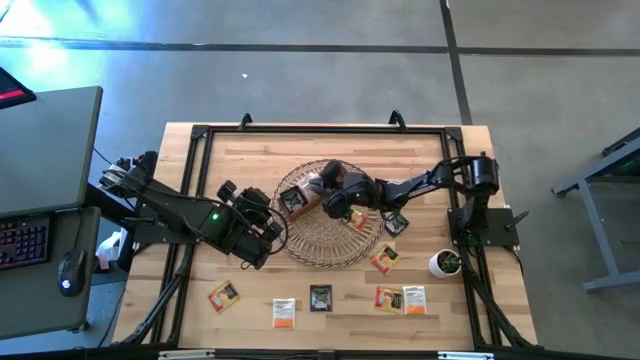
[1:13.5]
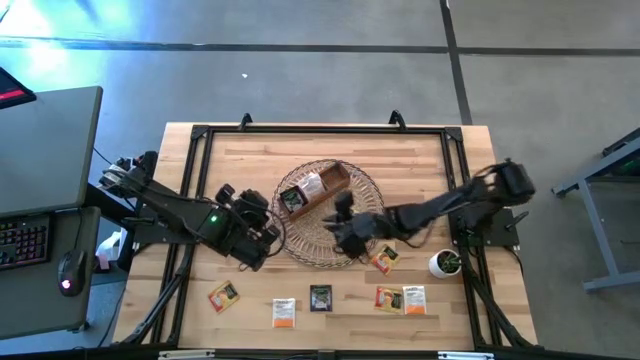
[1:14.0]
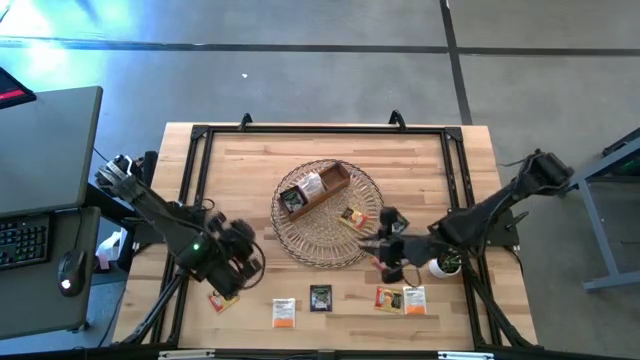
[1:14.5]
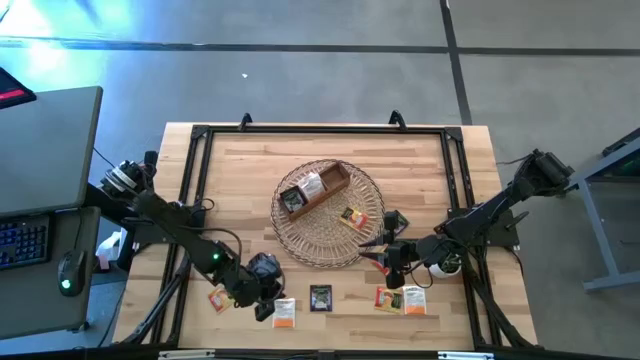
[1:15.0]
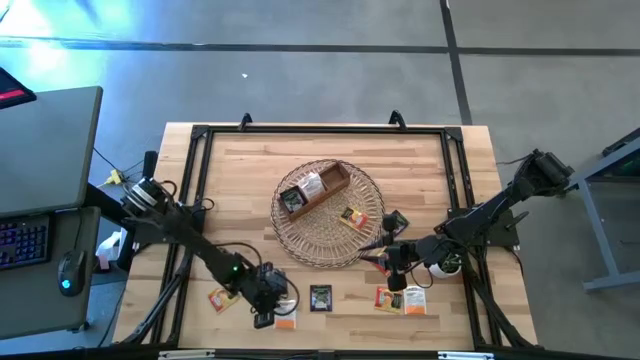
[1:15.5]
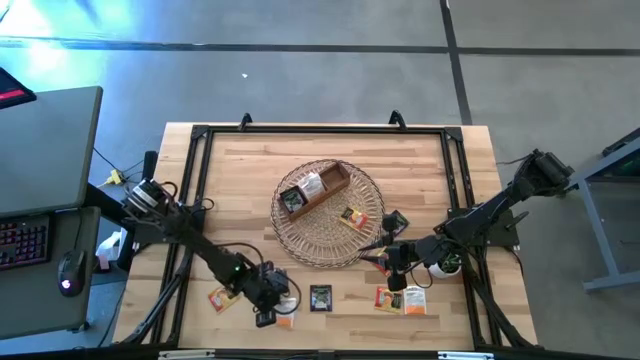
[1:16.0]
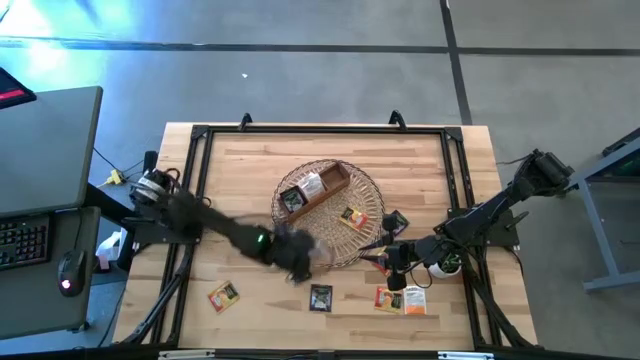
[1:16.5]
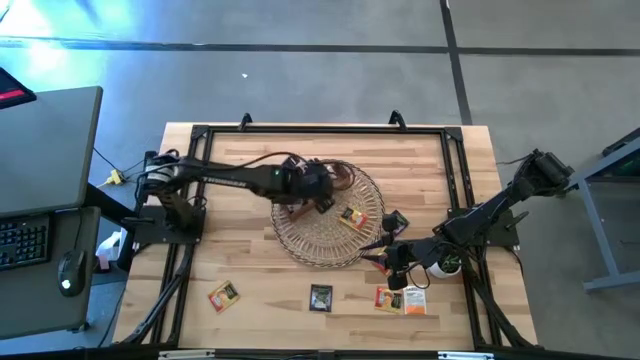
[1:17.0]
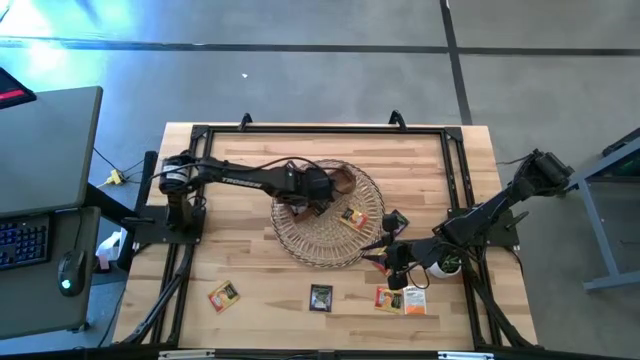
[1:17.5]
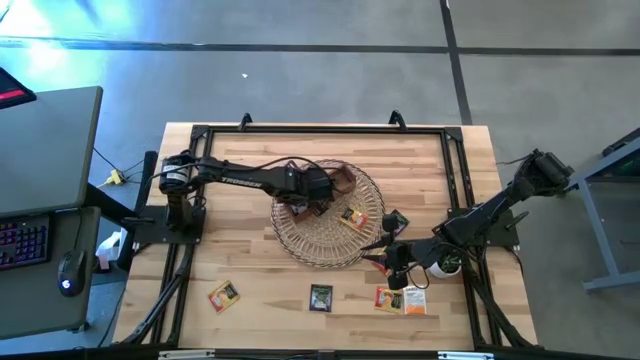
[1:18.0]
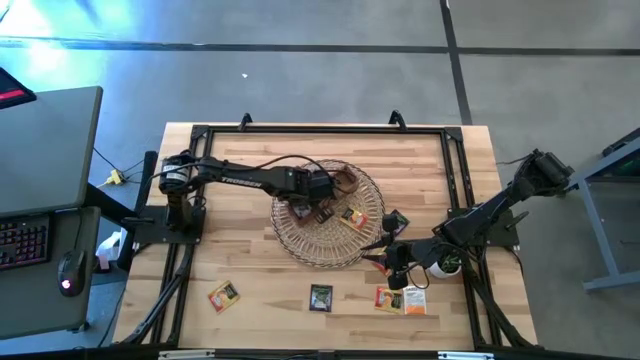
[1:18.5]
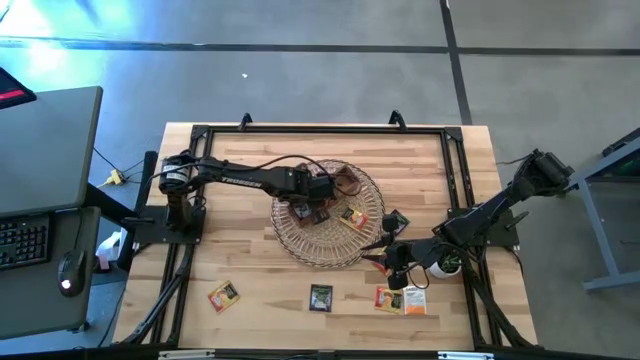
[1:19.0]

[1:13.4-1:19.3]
Task: Pick & Place Tea
Put the white tea bag into the middle section of the brown wooden organizer

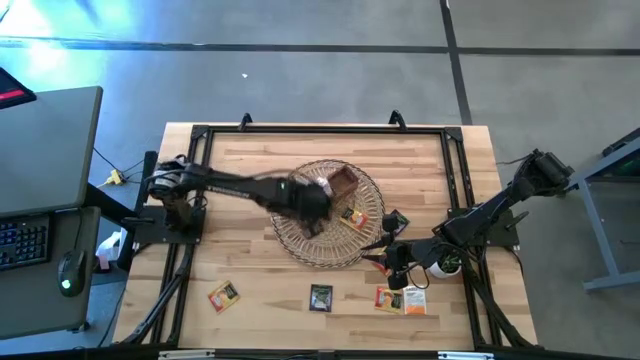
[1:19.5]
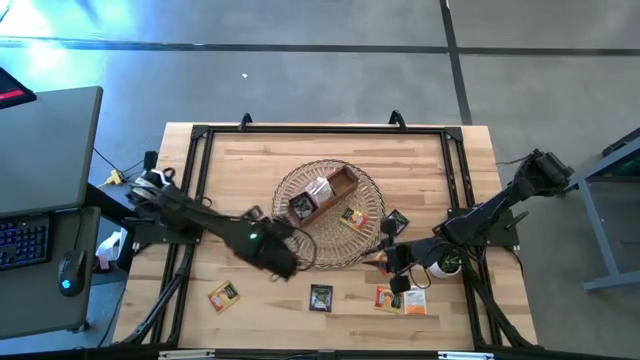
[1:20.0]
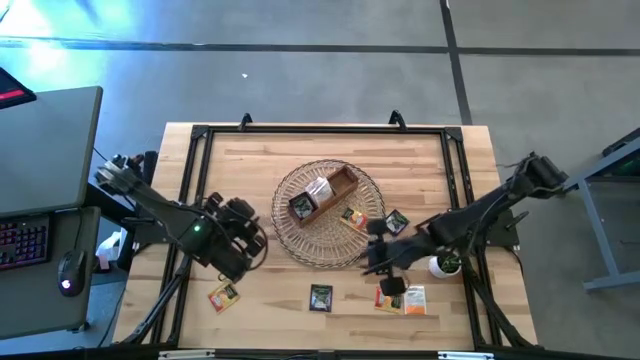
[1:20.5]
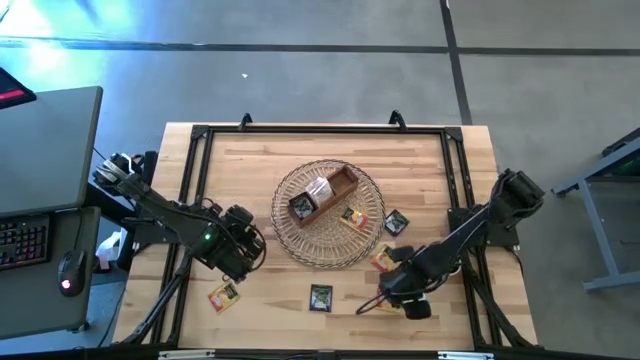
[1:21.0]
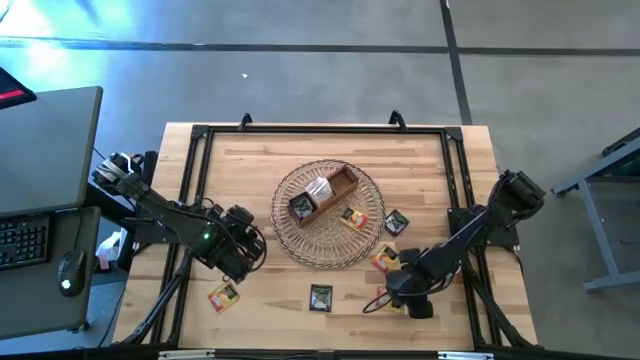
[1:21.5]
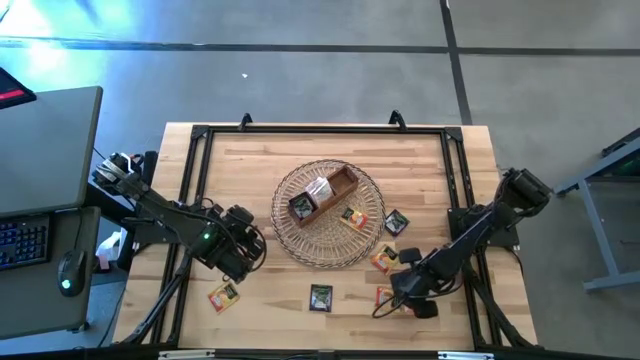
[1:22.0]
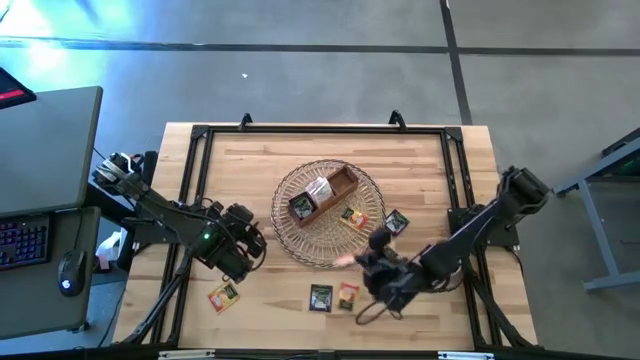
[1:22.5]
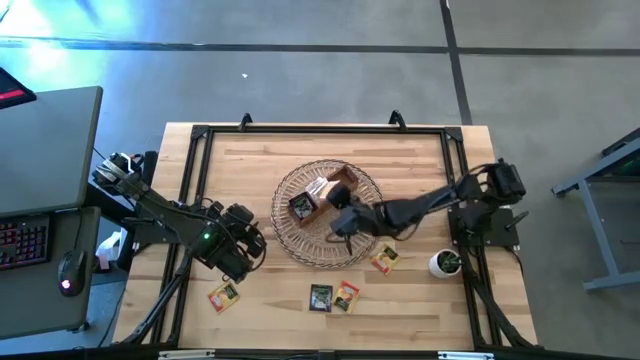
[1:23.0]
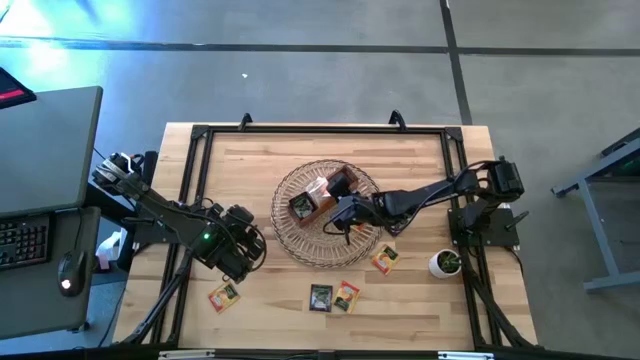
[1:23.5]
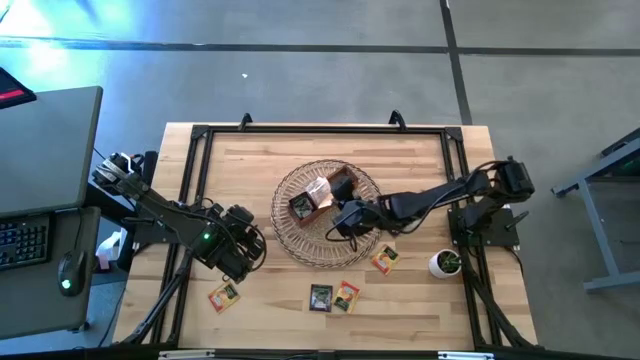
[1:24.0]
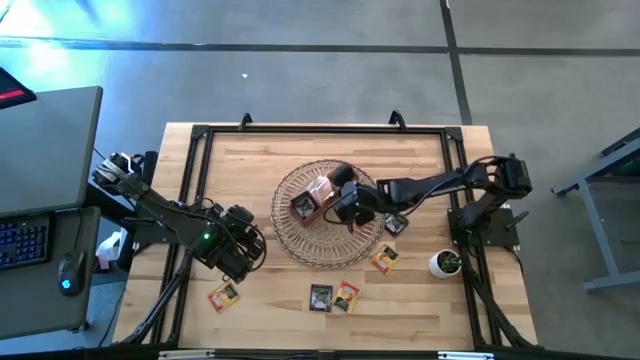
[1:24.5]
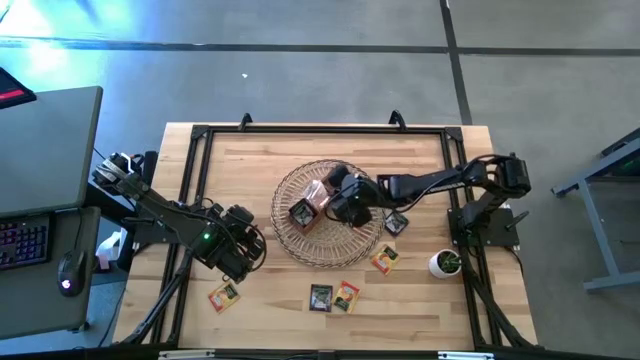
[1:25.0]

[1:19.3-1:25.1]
Put the white tea bag into the middle section of the brown wooden organizer

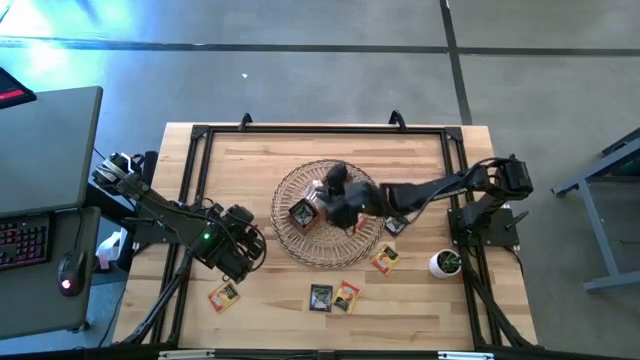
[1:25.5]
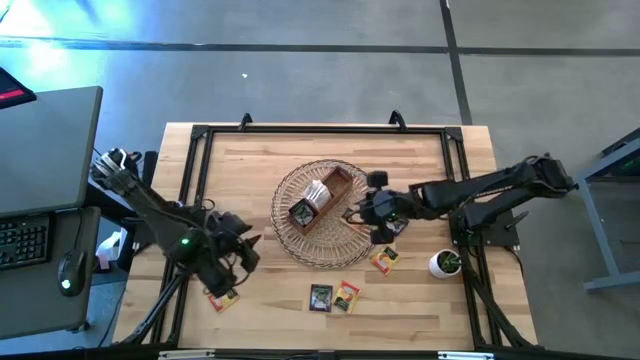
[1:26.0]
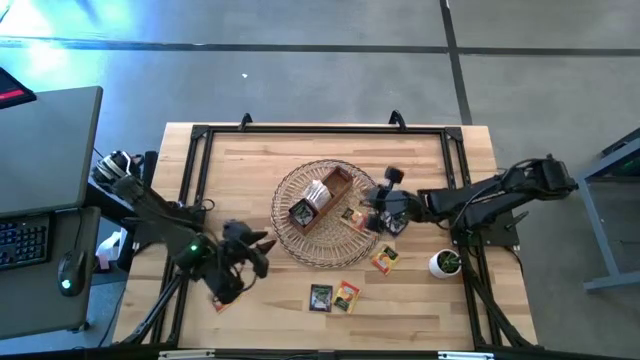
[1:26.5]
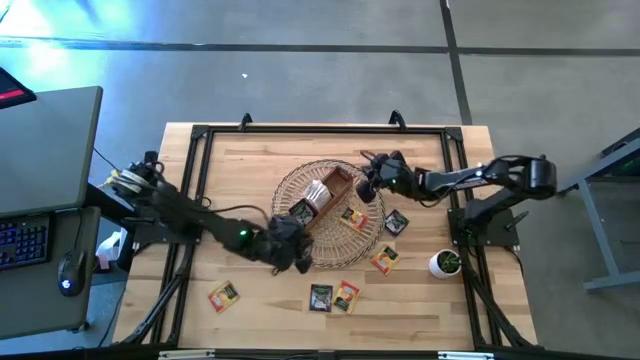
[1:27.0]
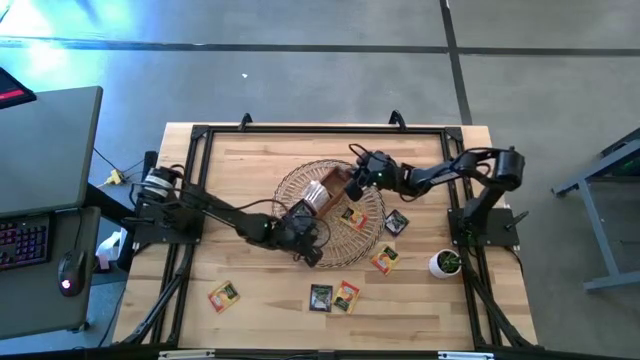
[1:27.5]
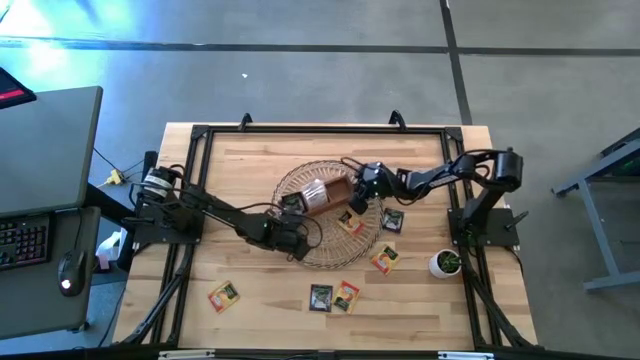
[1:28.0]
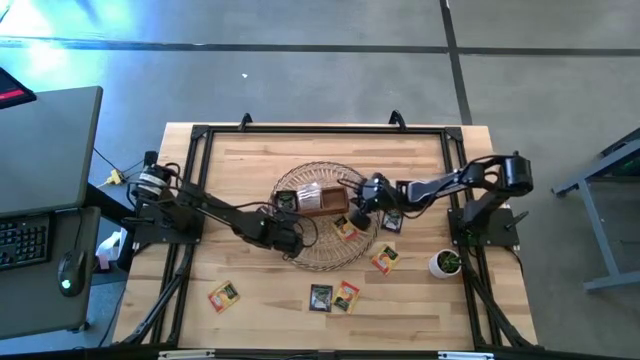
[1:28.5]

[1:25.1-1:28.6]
Adjust the wooden organizer on the table
